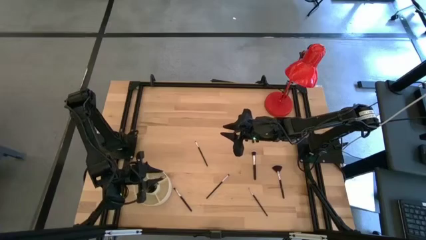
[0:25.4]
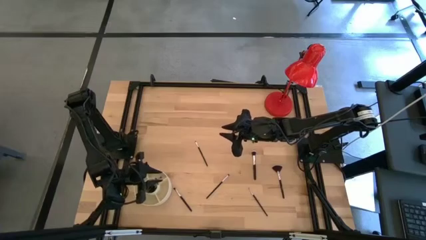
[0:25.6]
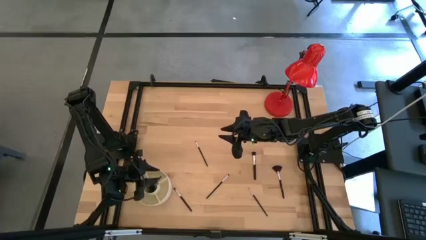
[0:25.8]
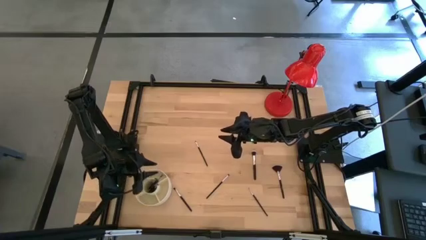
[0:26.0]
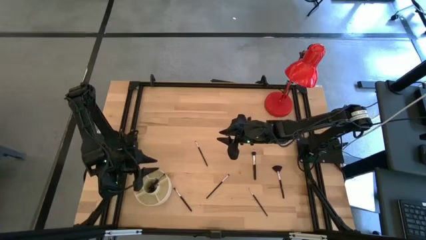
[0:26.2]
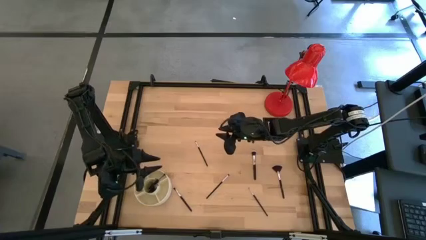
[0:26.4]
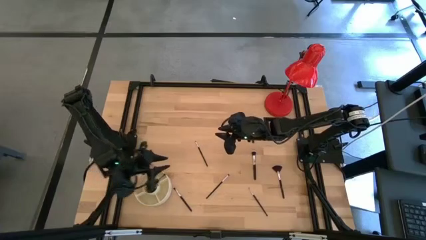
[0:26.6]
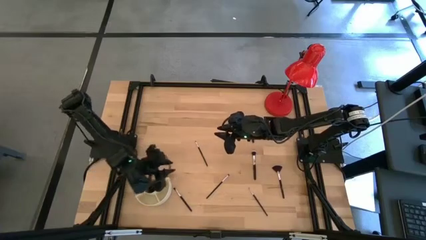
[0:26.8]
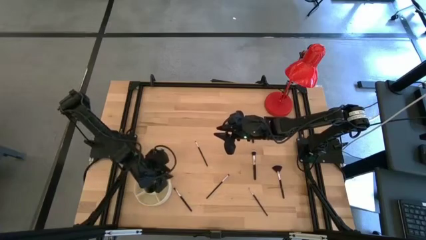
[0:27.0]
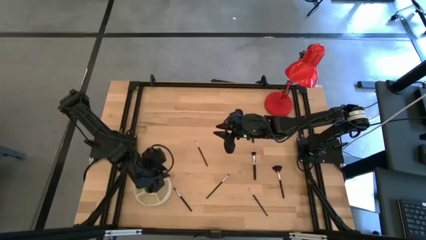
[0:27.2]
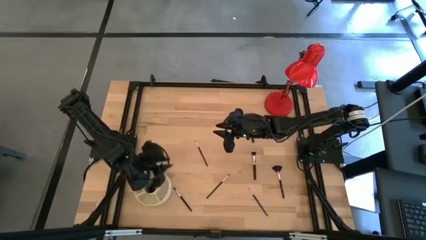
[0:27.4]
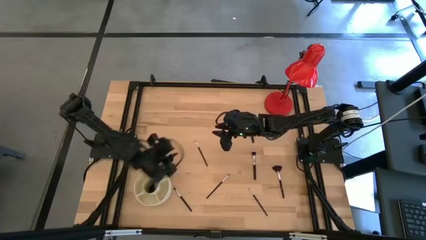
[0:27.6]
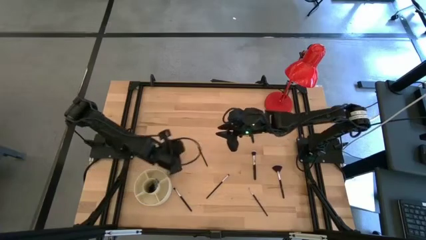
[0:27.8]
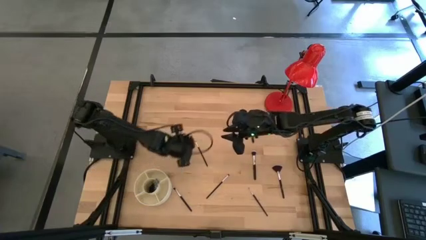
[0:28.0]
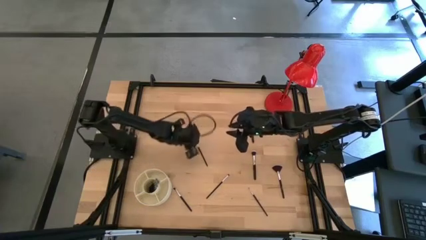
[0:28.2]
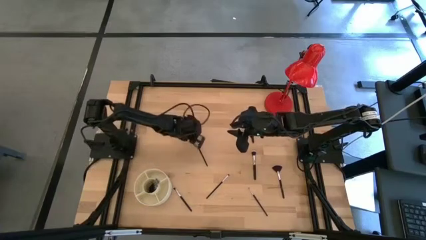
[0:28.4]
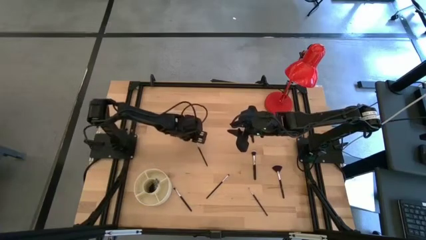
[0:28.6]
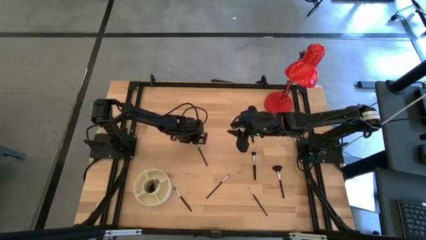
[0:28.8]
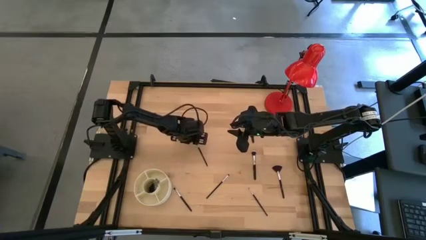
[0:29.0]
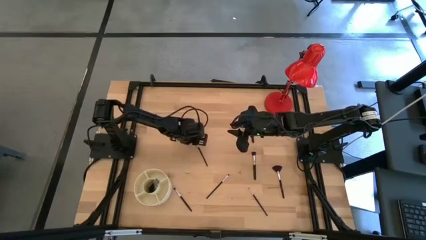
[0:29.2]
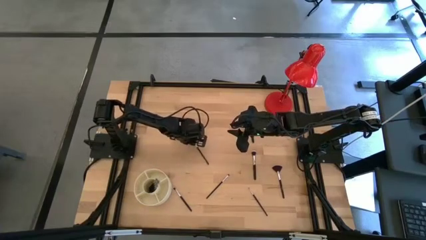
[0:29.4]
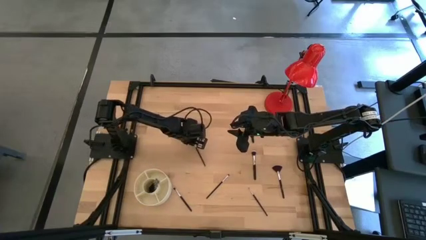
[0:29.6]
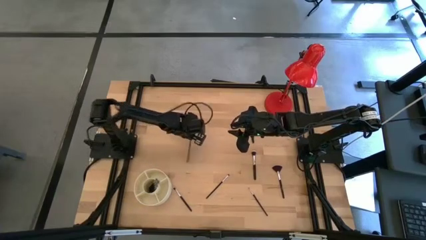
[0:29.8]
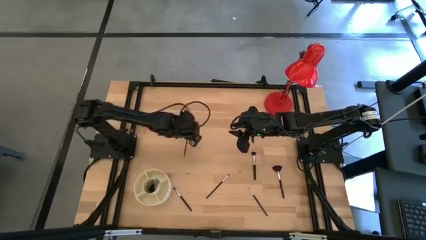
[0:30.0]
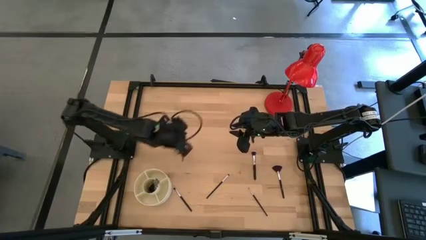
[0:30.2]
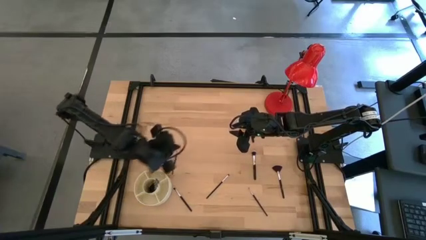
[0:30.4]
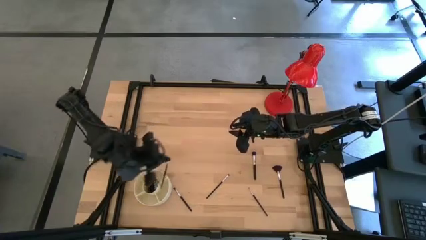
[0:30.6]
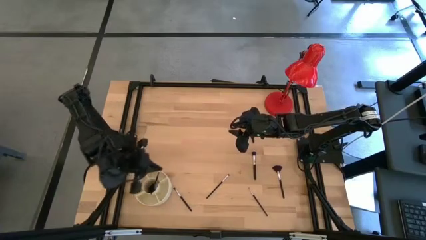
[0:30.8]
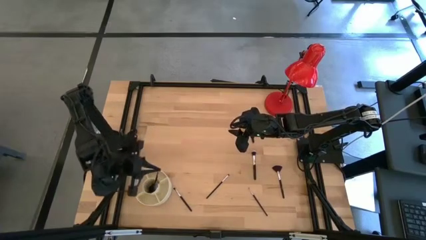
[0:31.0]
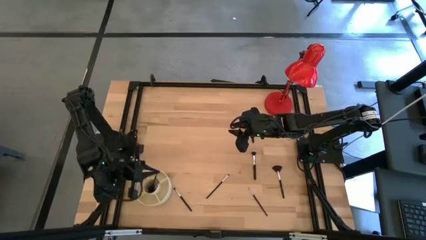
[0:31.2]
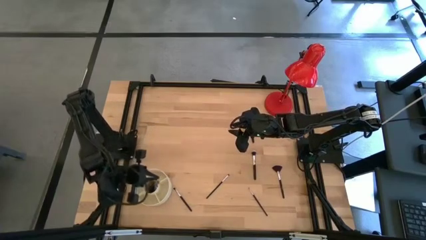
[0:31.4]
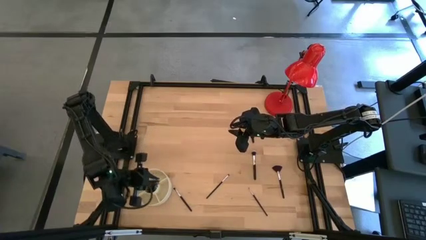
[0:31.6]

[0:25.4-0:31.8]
Task: Put items in baskets/containers
Put the black eyeshadow brush into the white organizer

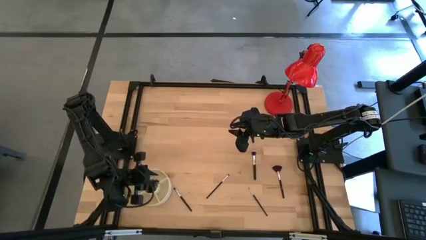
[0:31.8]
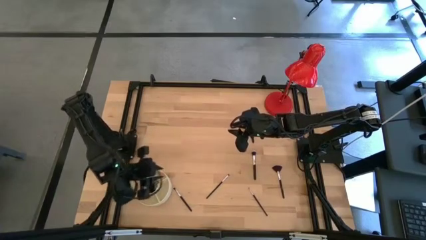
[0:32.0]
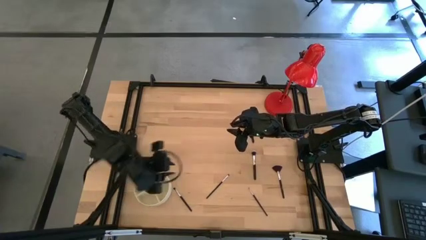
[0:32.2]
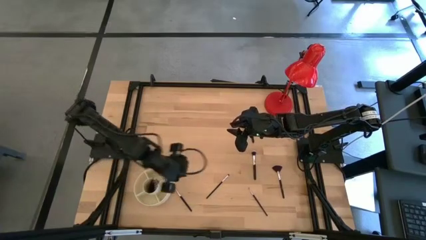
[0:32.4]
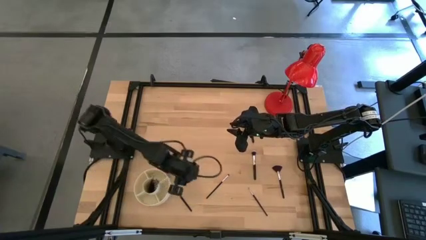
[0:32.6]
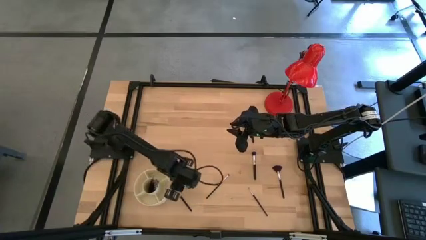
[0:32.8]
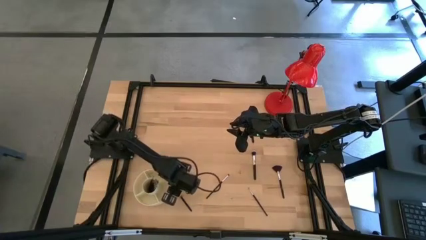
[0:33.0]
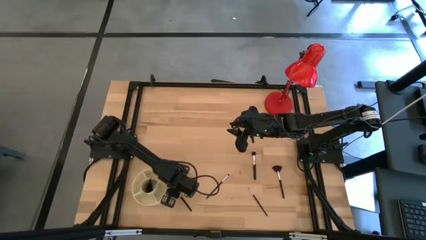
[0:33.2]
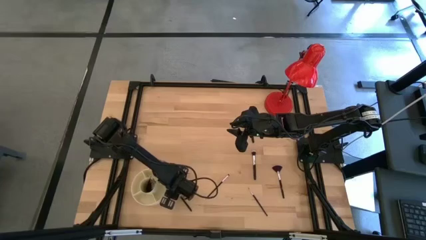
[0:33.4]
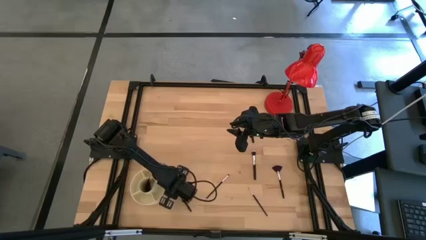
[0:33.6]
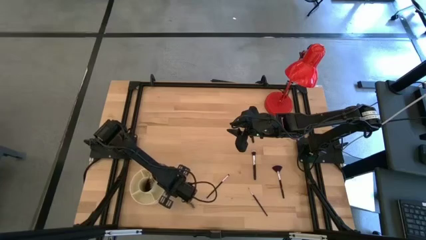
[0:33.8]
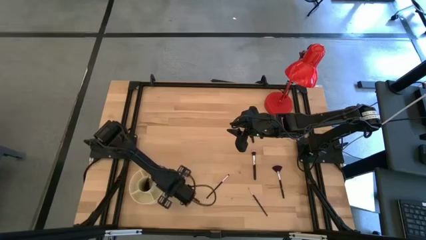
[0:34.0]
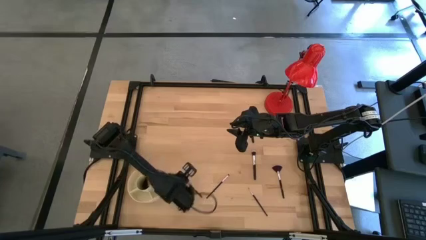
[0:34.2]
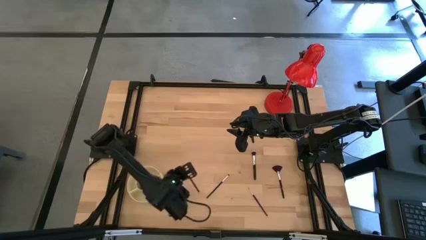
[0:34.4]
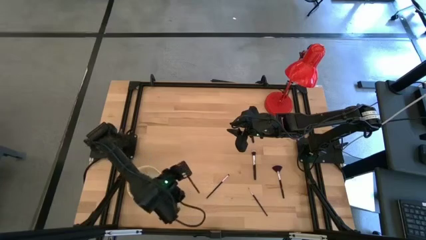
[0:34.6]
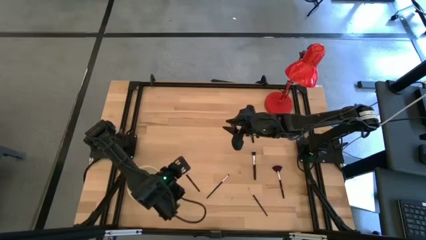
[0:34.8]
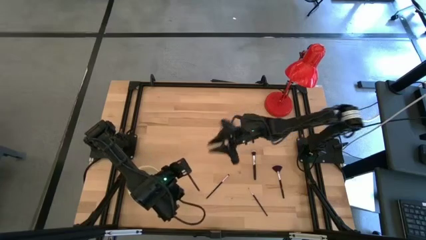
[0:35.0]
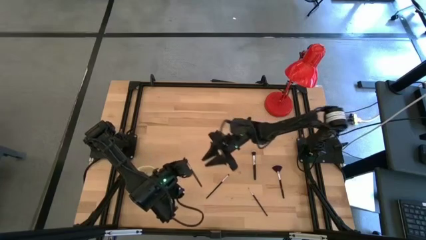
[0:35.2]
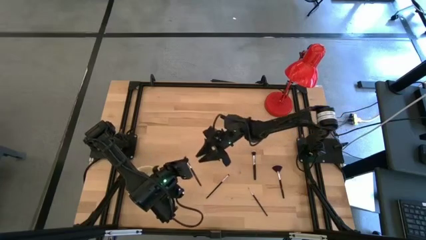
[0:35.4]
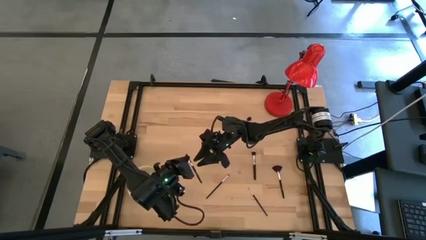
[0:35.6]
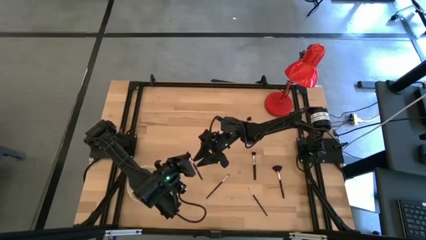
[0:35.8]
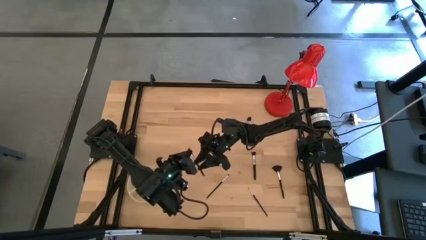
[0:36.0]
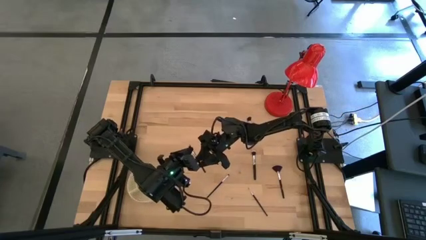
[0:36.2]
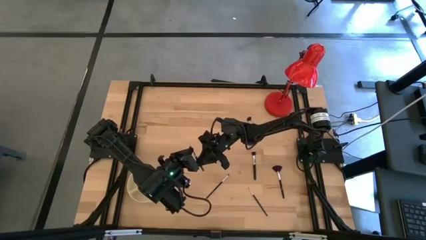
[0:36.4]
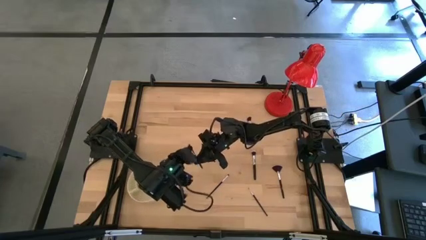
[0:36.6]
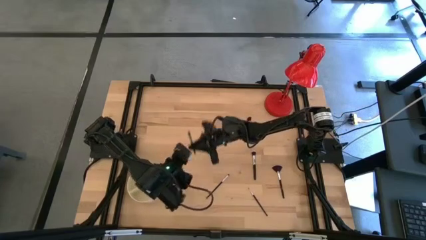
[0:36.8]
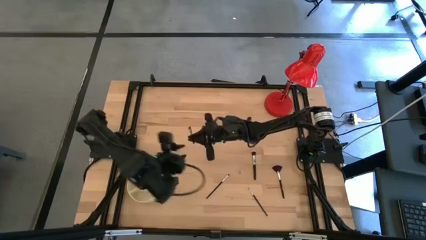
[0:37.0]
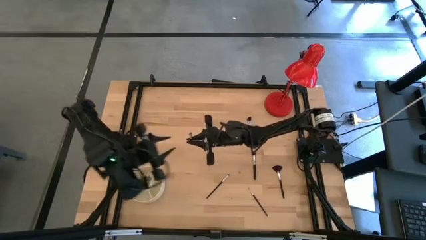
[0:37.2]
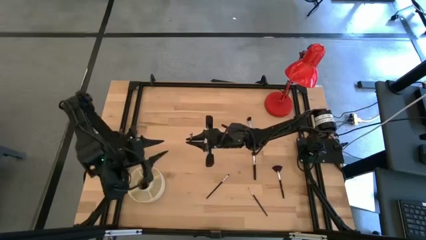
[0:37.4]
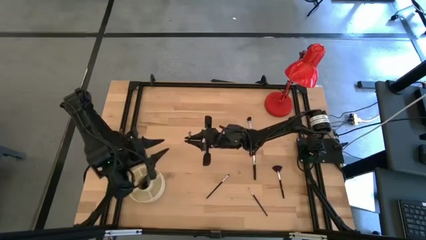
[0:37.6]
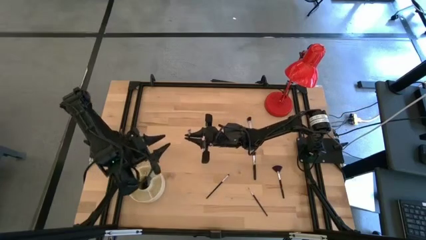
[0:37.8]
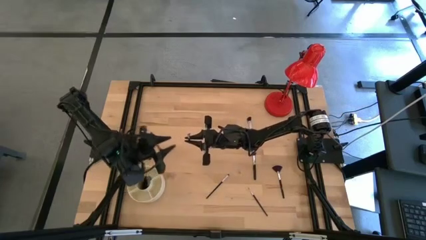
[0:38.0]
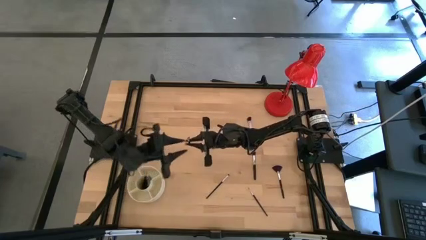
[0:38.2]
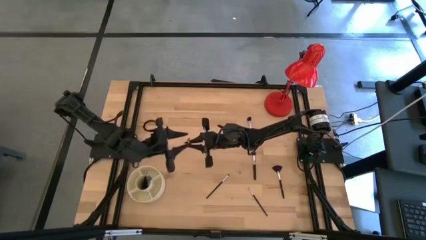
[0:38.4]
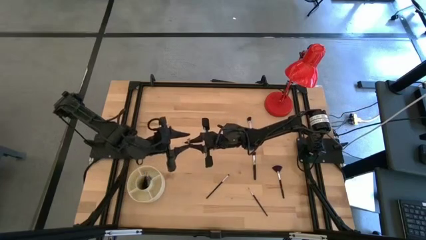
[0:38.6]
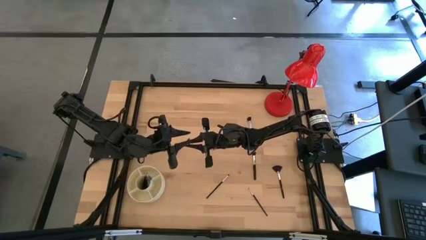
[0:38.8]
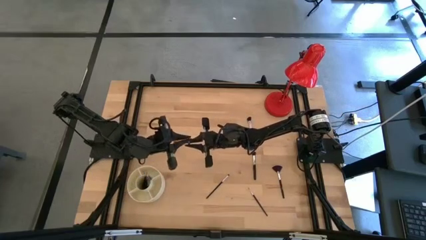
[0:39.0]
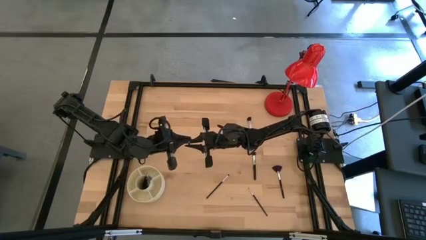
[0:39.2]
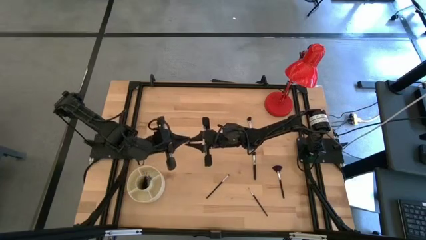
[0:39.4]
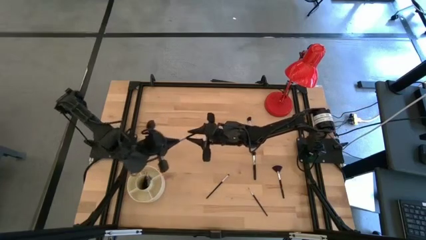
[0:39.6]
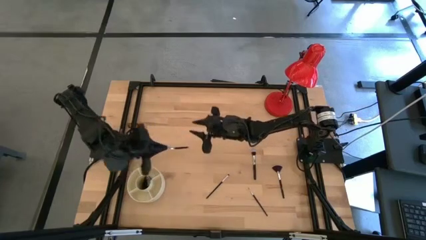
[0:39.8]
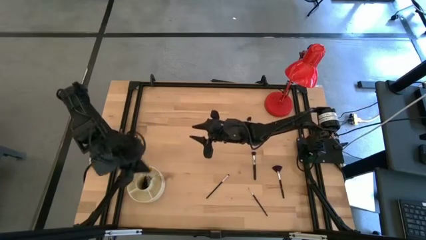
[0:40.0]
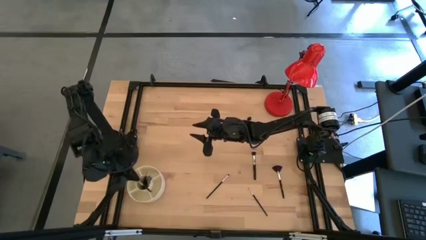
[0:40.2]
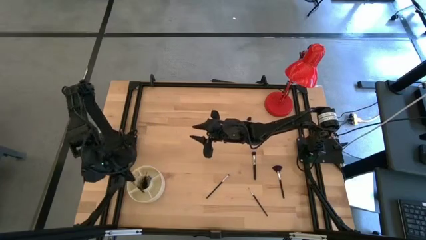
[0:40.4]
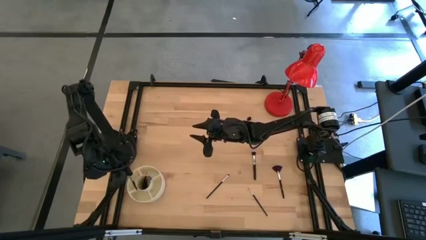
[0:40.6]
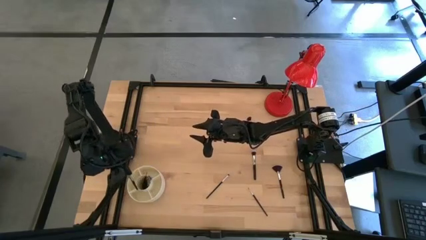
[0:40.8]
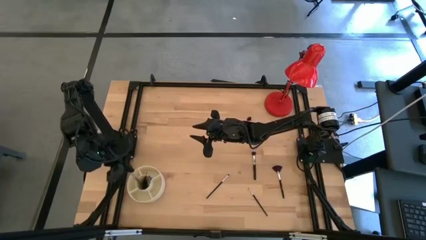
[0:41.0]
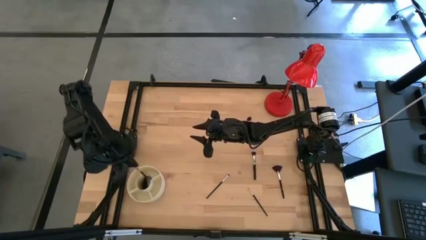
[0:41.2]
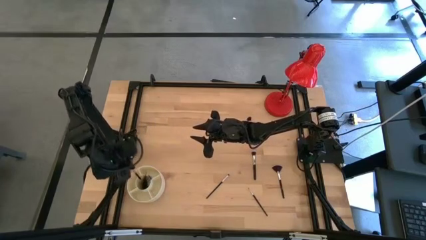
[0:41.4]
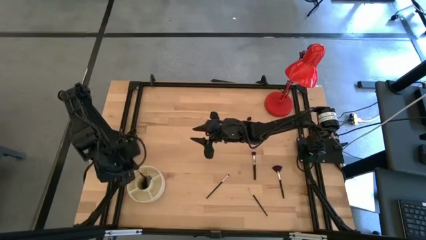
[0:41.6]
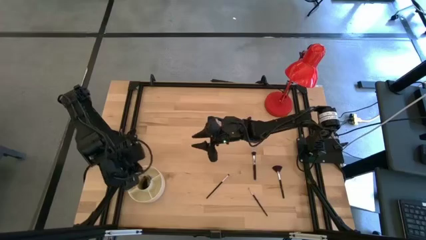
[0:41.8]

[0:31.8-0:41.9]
Put the black eyeshadow brush into the white organizer

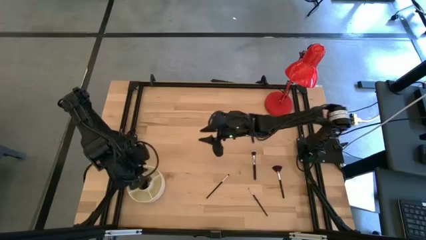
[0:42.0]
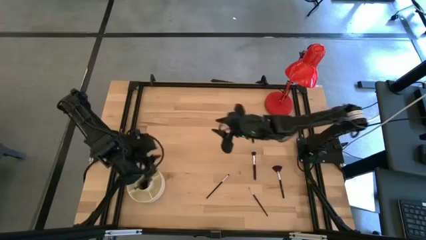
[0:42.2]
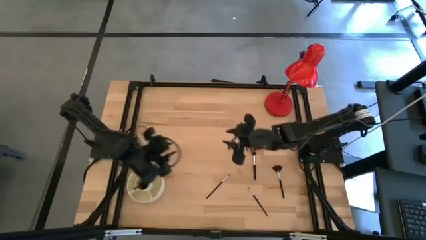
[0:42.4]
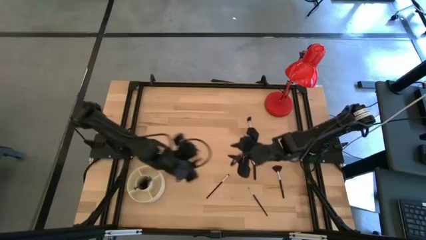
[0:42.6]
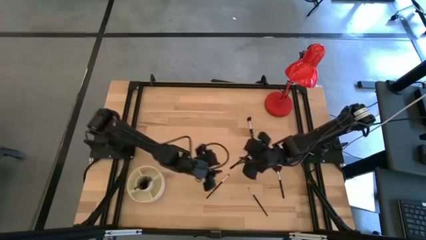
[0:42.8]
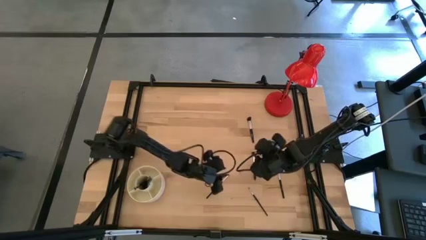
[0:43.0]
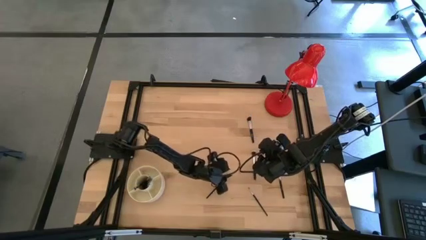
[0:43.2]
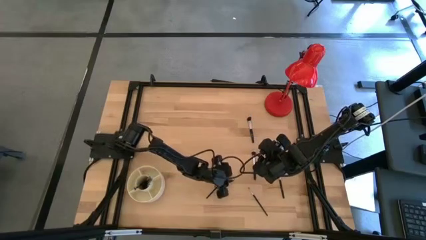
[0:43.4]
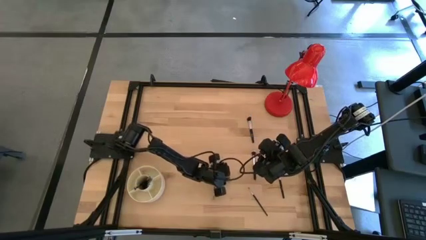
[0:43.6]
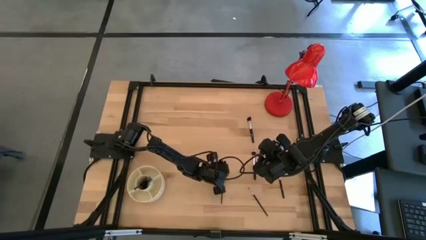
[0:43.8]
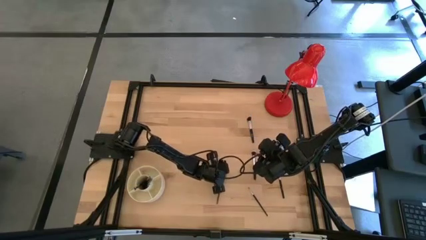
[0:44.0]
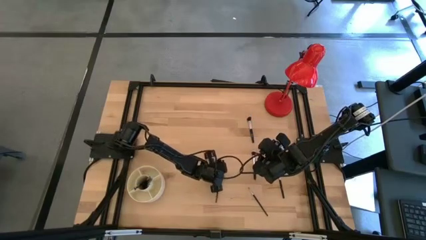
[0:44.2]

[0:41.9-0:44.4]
Put the black eyeshadow brush into the white organizer
